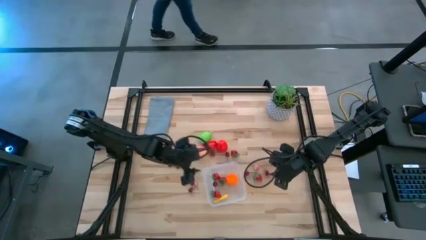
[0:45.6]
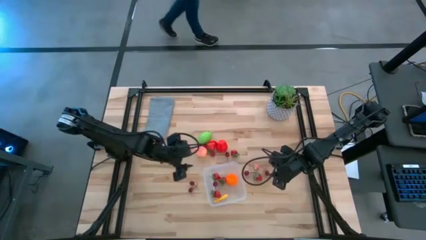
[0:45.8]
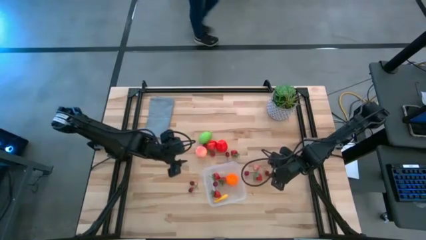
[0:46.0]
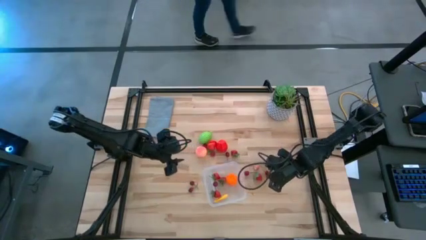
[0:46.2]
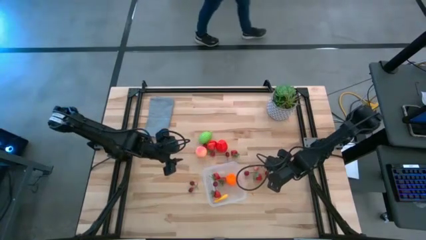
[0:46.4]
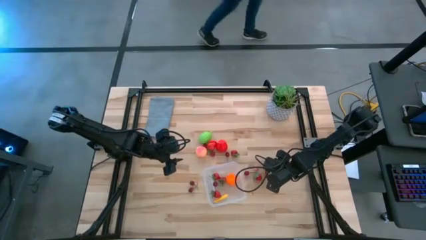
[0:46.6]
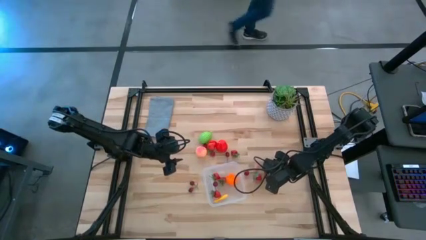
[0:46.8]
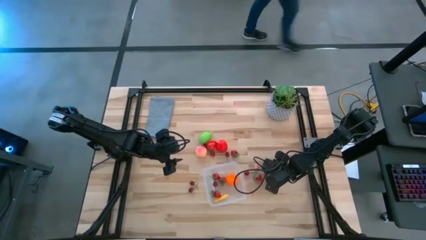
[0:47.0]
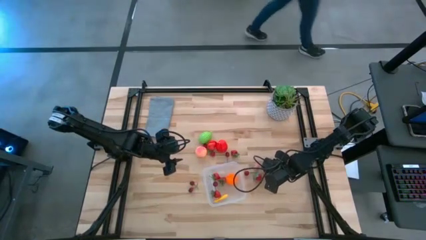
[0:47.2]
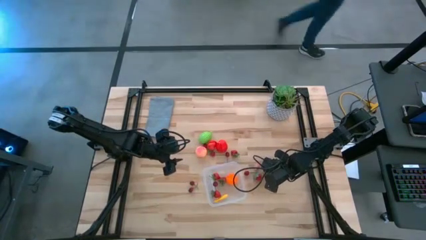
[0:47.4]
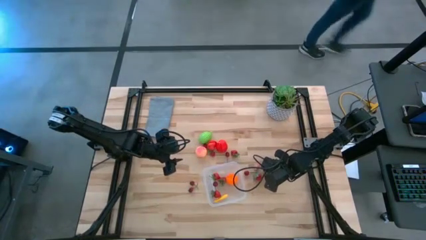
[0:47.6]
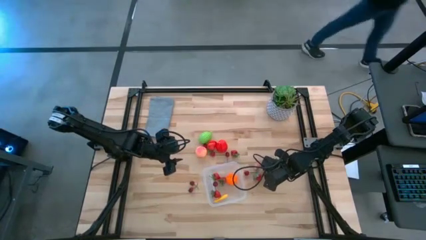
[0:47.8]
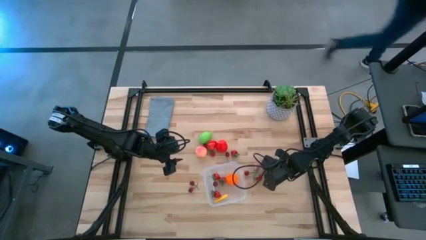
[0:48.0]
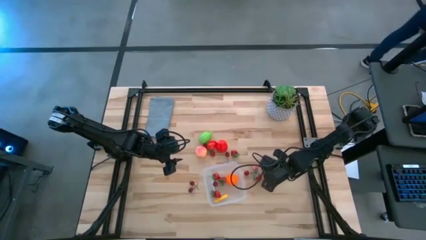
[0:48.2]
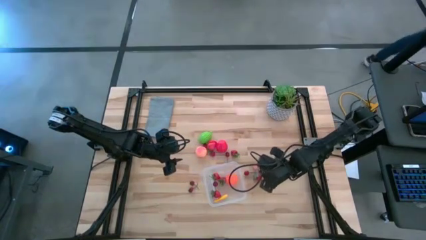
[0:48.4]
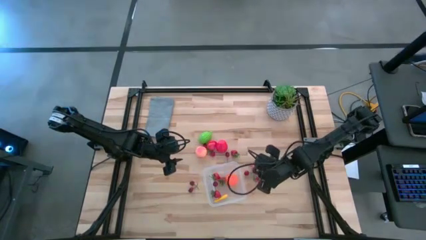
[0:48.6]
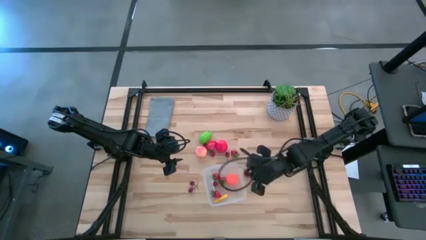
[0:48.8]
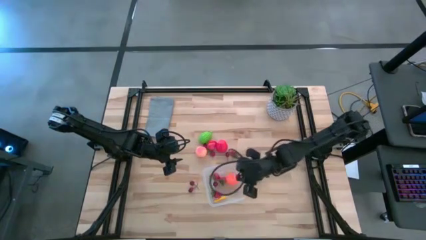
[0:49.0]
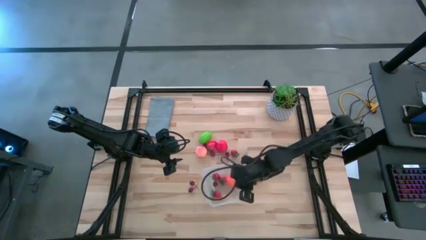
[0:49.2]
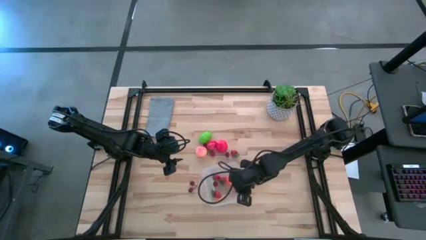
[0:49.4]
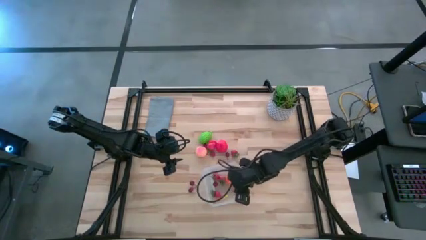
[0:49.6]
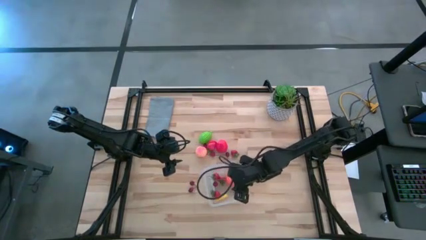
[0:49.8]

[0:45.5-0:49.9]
Task: Pick and placing Produce into tupperware
Put the red cherry into the transparent bin

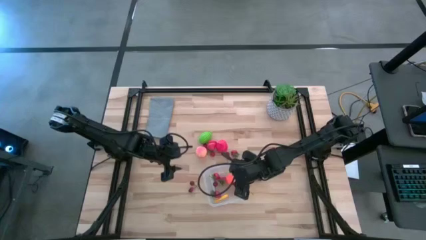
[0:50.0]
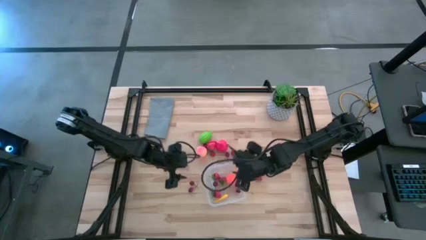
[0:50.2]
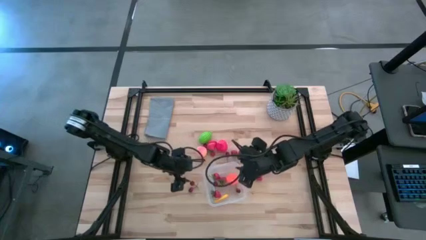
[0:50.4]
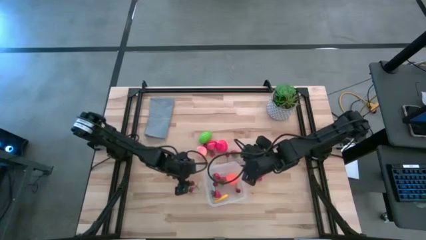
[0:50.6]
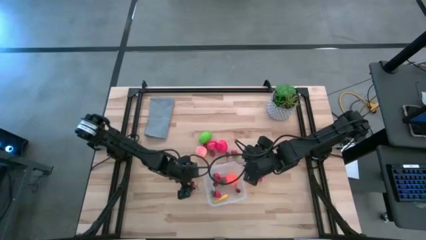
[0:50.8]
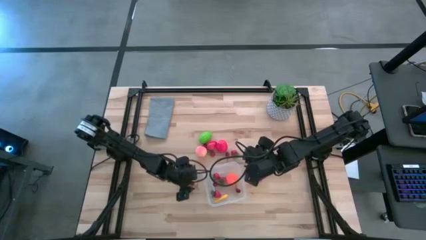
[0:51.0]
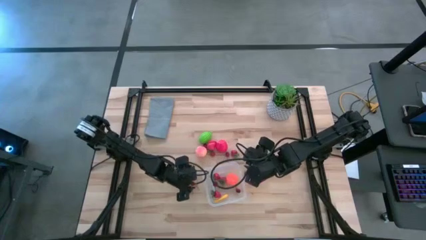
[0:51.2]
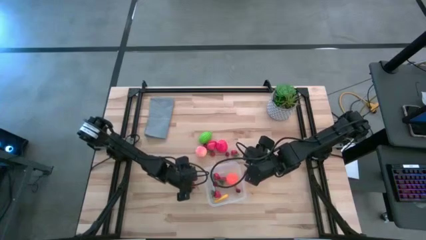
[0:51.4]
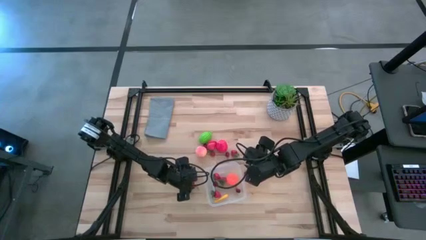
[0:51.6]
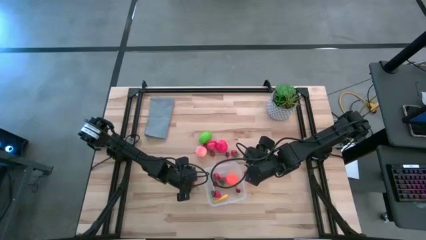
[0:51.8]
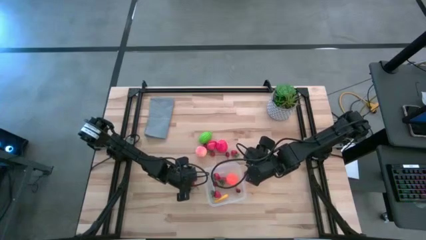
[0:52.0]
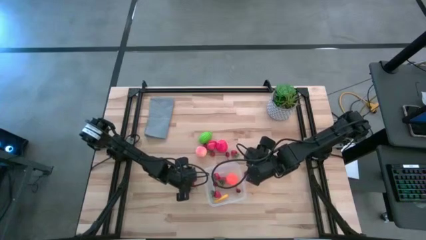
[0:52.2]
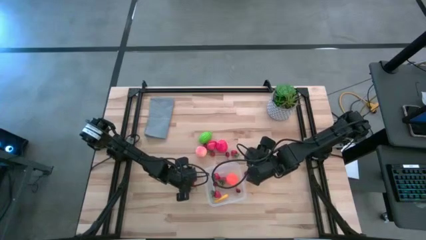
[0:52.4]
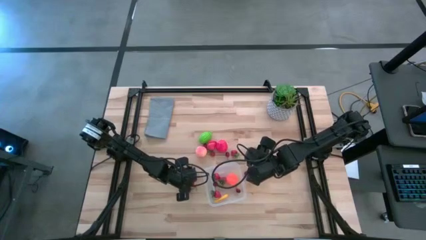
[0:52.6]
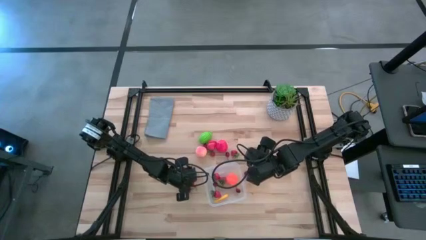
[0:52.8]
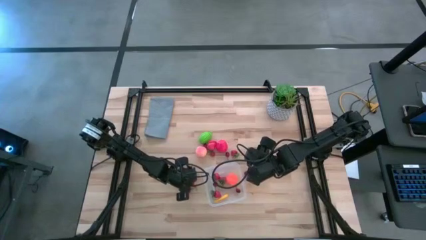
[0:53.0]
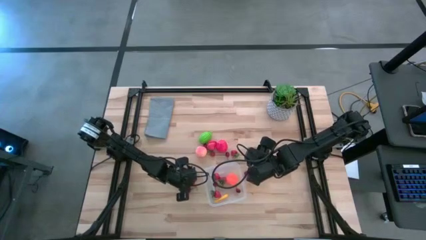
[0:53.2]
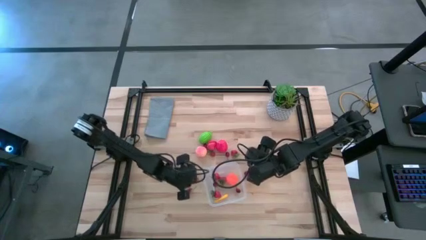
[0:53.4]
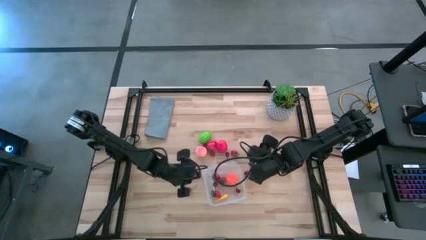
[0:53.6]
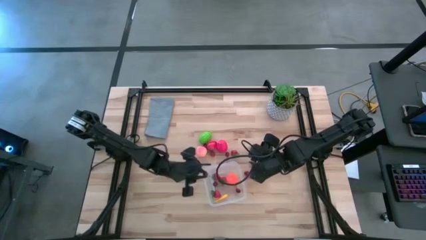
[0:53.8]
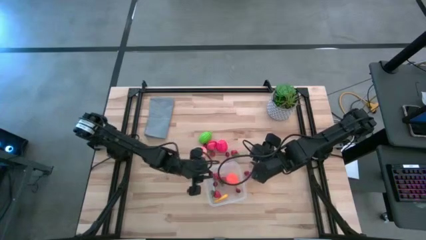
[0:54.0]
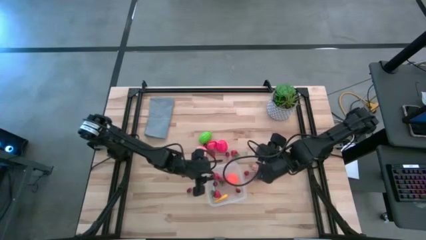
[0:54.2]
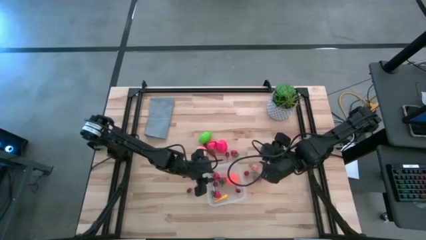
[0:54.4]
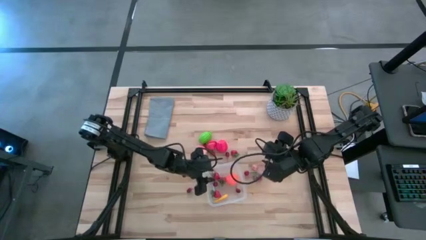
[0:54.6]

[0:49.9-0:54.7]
Put the red cherry into the transparent bin

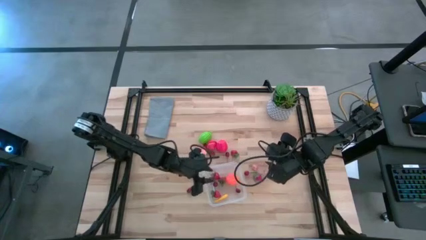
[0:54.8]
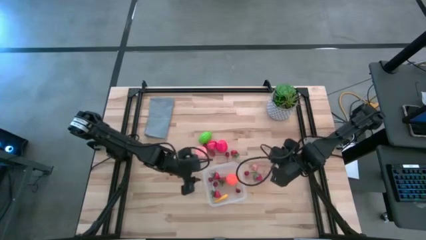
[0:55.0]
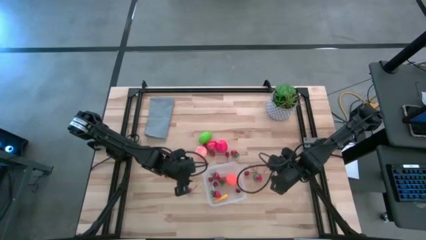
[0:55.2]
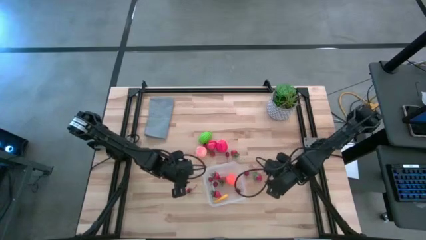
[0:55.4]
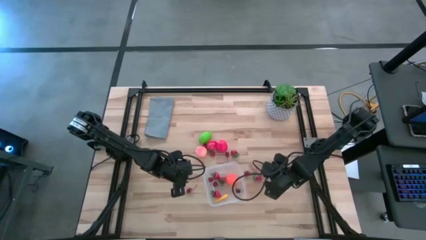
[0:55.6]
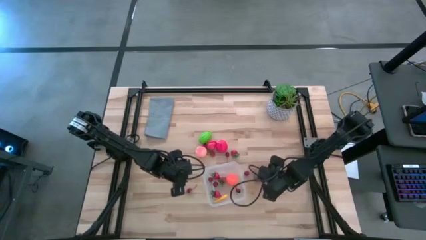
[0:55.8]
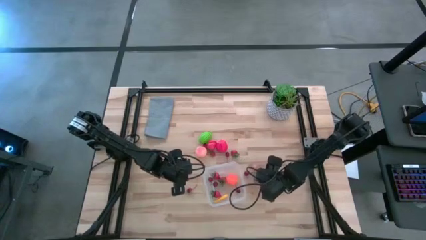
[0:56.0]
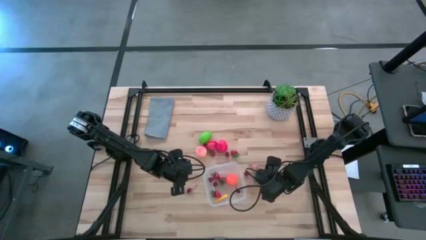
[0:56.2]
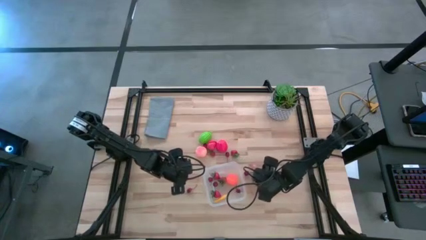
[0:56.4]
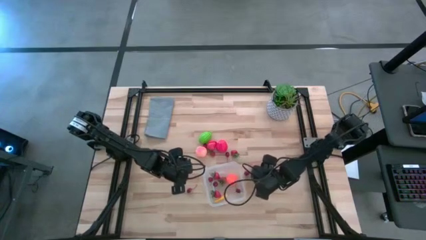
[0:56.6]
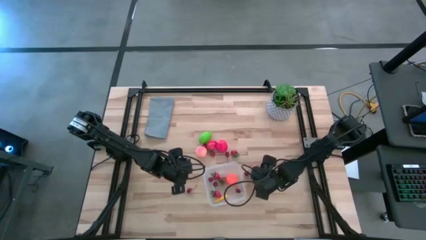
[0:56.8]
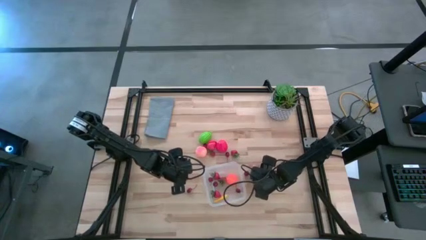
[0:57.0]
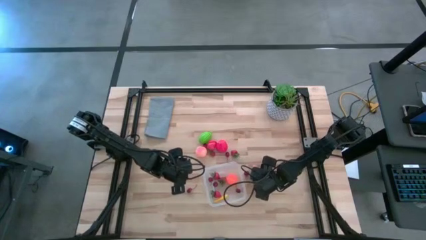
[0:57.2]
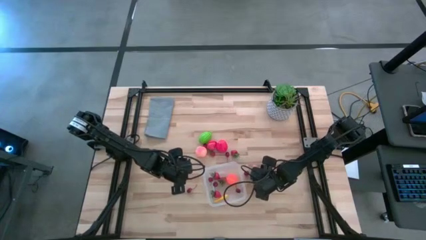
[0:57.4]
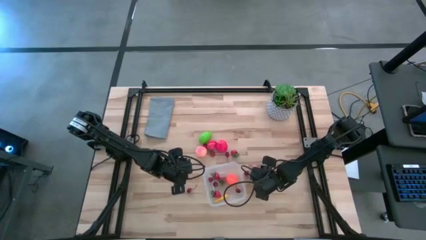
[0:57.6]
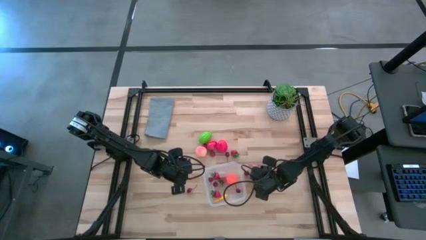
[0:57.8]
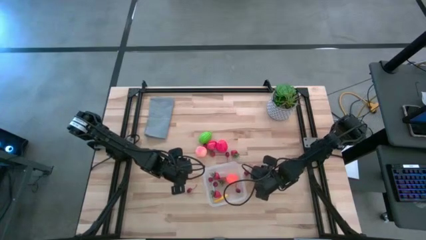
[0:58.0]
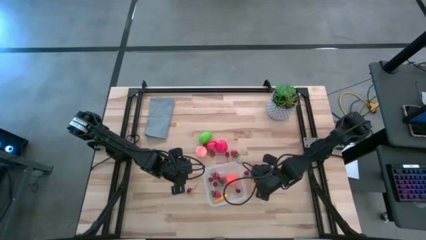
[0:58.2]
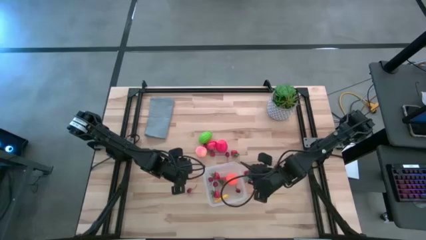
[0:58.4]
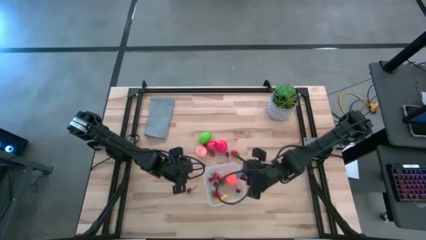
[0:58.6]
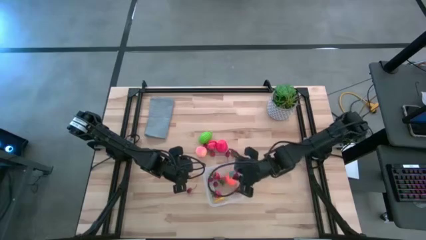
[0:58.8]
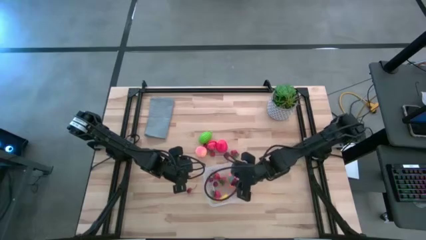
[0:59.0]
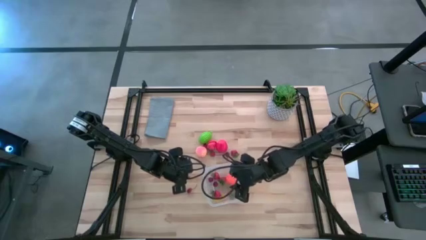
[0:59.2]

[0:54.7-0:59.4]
Put the red strawberry into the transparent bin

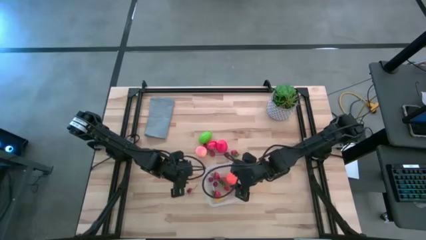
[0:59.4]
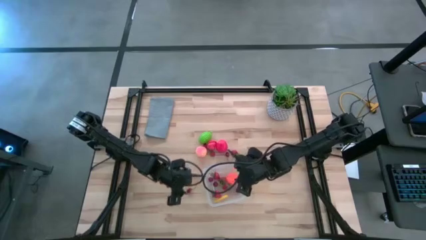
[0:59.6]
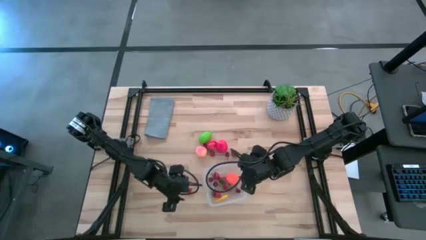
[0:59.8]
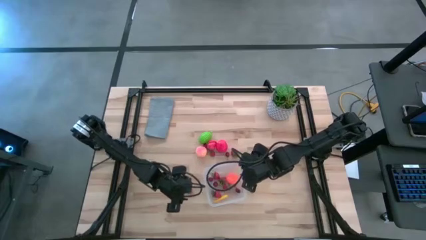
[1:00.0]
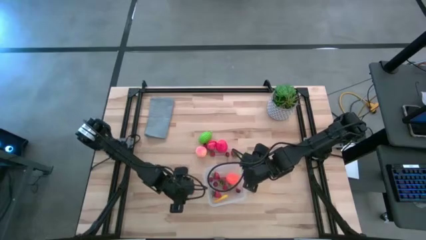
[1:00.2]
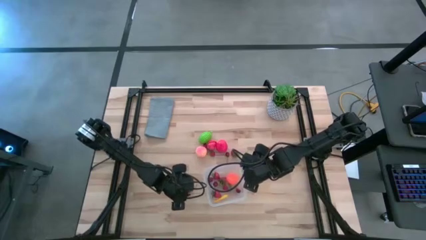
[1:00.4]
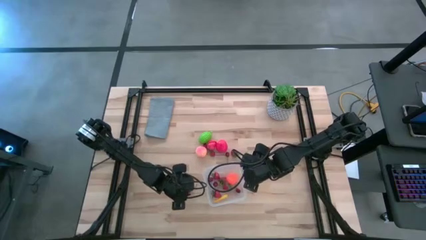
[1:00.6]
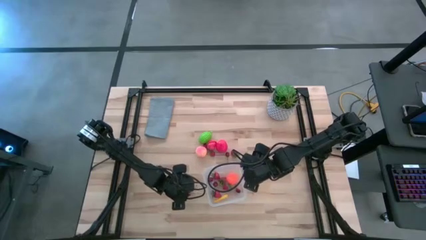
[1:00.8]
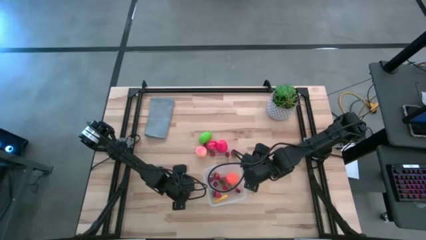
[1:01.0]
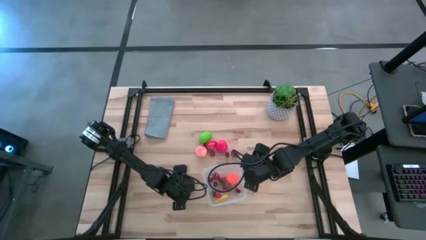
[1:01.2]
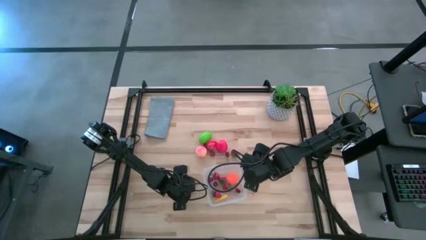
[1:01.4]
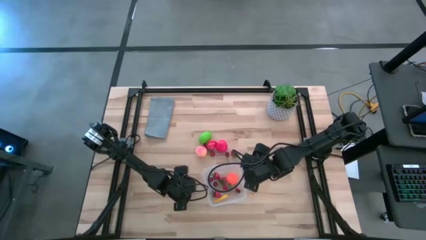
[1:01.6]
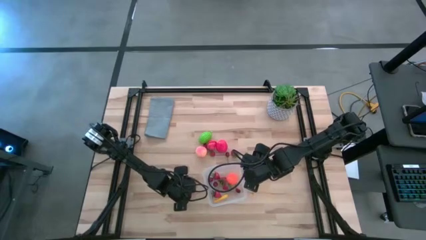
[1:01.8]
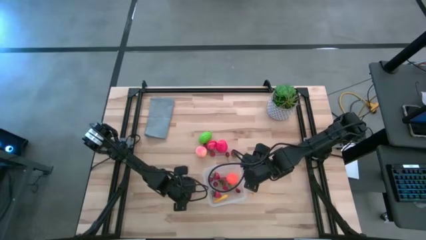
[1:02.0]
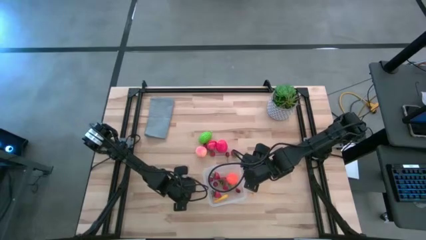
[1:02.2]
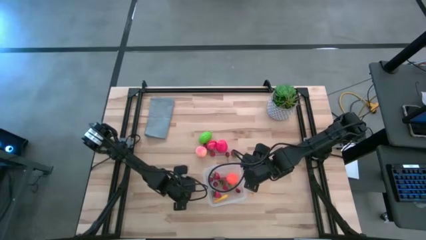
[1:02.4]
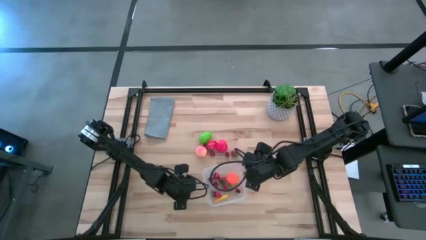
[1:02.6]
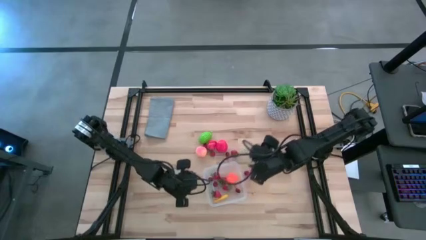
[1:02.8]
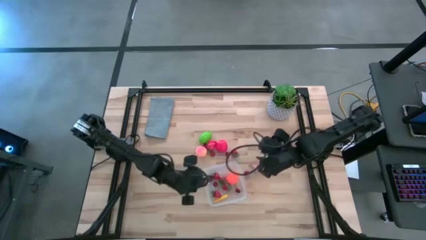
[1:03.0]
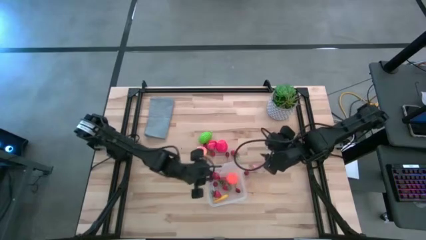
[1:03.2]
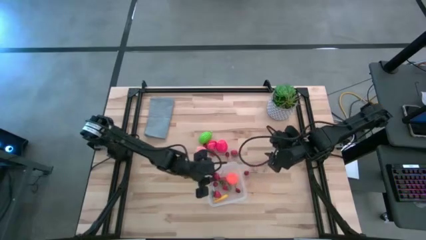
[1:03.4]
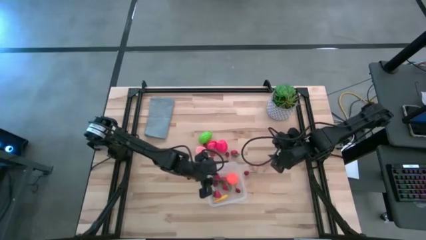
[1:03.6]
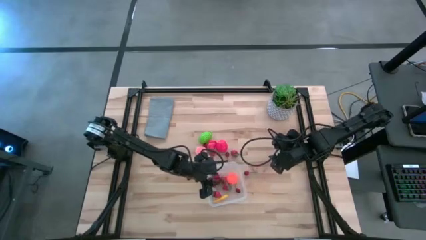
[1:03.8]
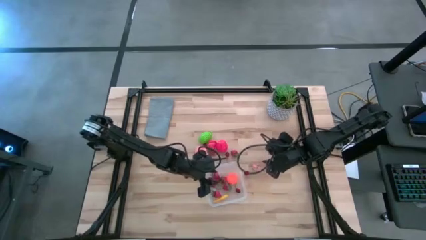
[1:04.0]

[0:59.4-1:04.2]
Put the red cherry into the transparent bin
